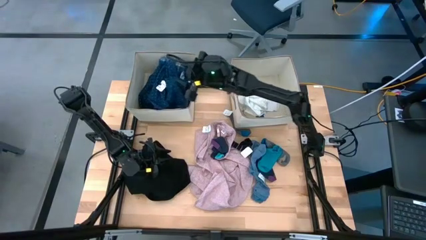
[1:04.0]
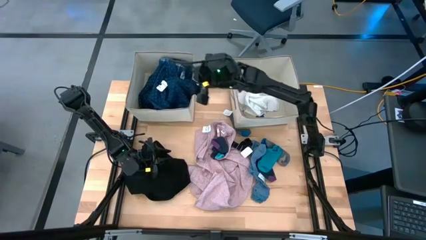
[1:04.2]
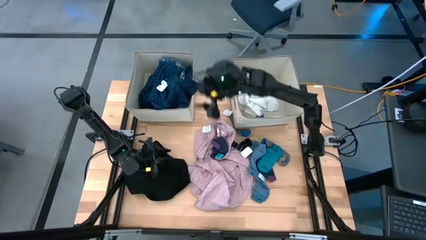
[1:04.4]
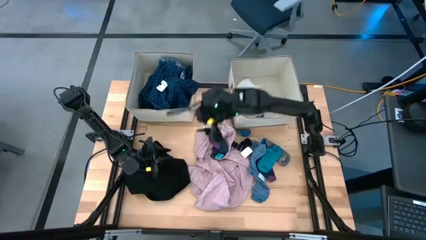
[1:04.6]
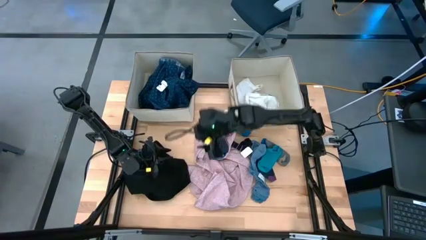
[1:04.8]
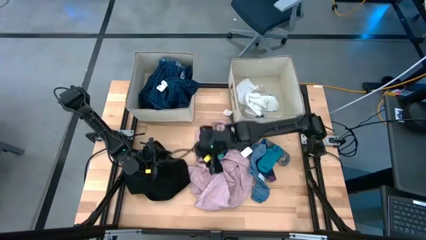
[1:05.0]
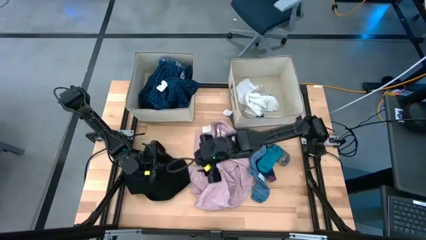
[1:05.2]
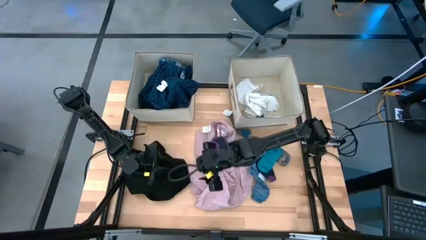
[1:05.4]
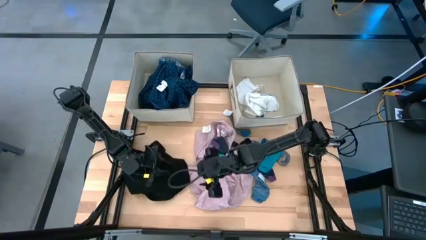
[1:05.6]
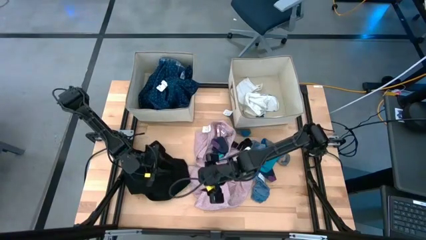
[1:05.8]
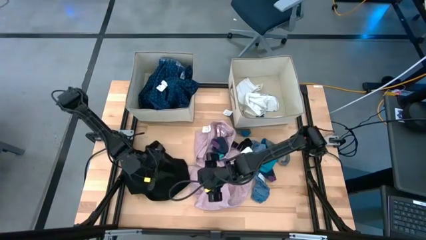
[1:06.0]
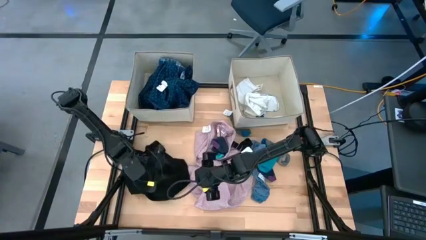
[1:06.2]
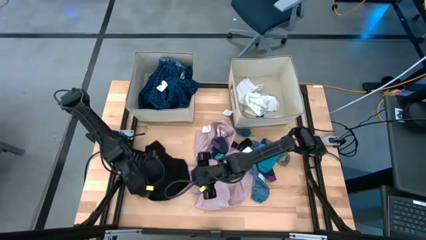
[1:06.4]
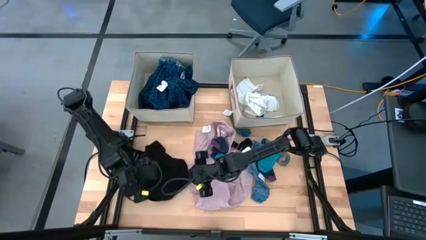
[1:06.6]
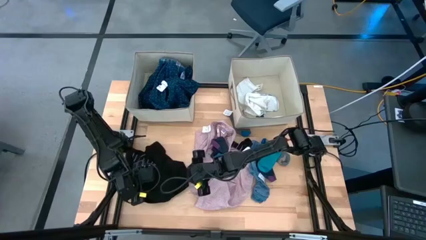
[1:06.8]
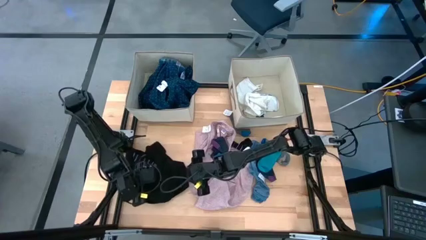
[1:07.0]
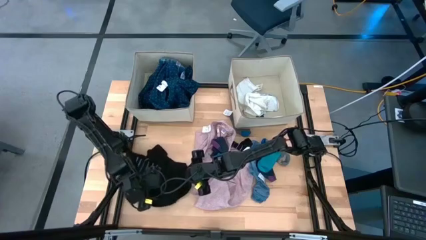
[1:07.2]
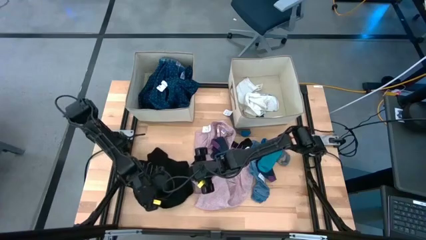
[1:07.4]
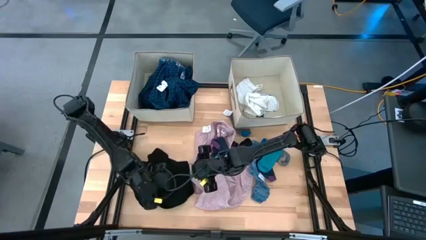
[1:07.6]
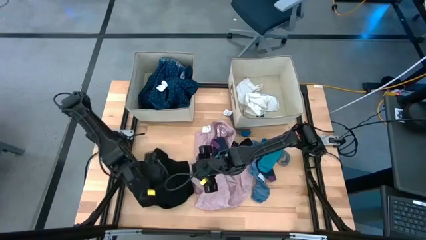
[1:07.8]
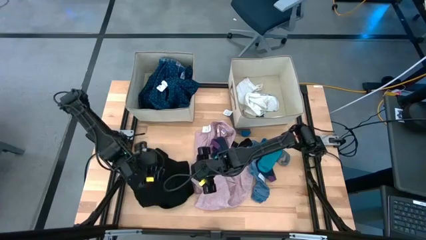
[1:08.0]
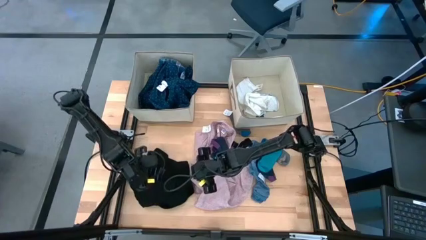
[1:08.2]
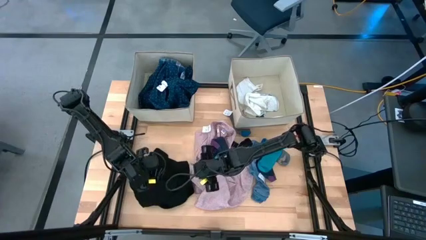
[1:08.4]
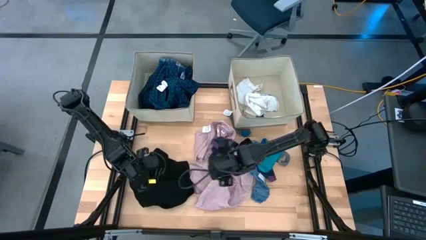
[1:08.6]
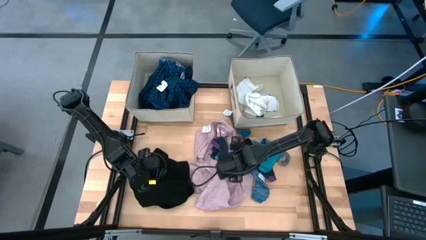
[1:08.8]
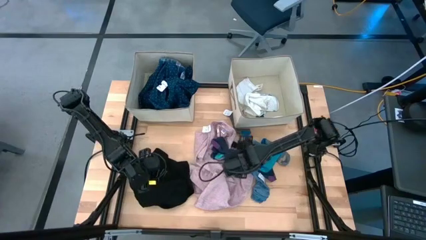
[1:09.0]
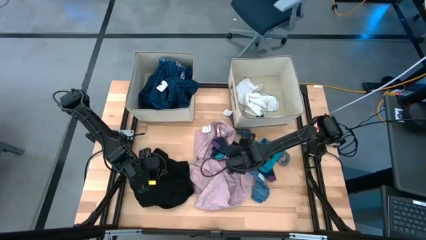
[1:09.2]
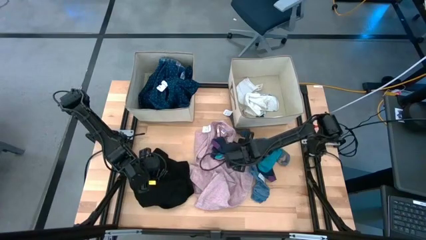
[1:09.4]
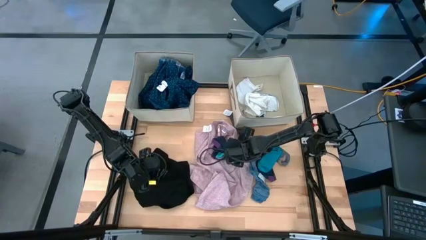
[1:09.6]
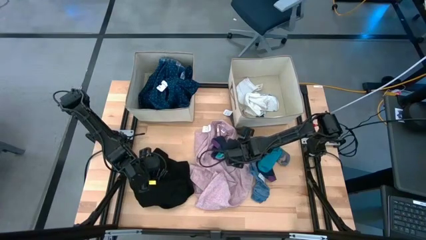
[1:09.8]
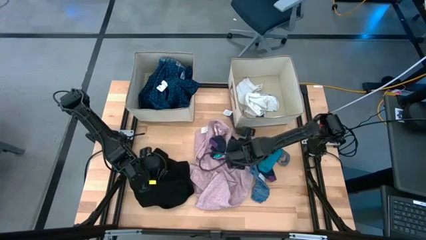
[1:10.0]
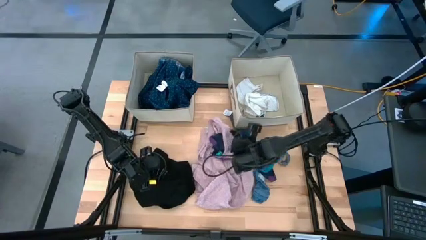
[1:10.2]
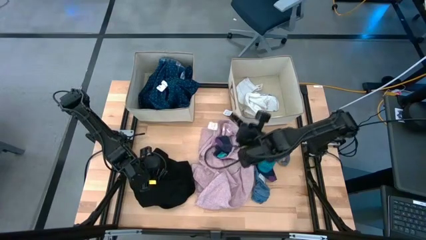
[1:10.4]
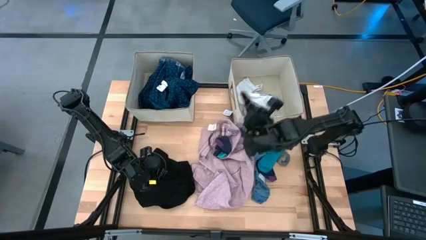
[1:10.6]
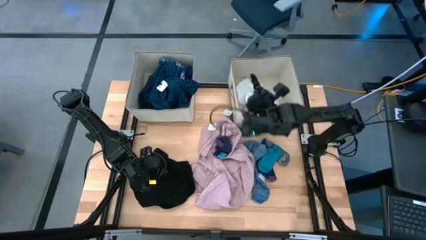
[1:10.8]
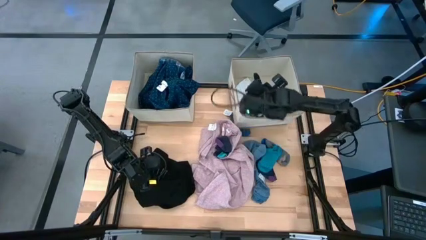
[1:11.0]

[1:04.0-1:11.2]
Task: Sort clothes
Put the left black stripe sock into the right brown laundry organizer

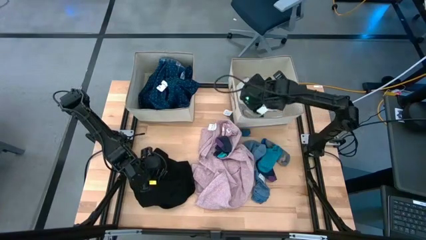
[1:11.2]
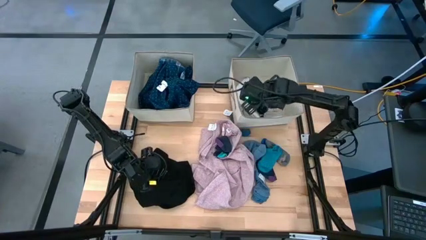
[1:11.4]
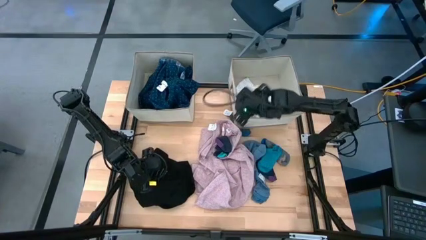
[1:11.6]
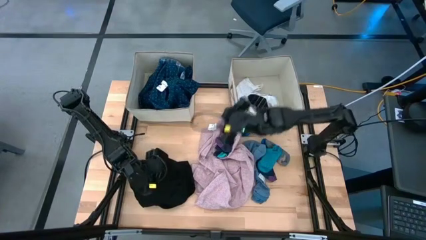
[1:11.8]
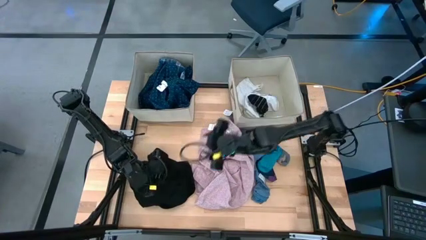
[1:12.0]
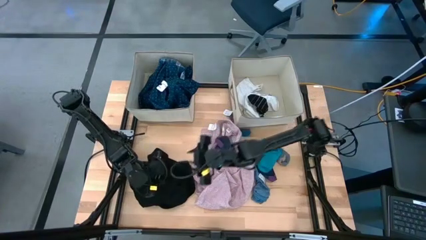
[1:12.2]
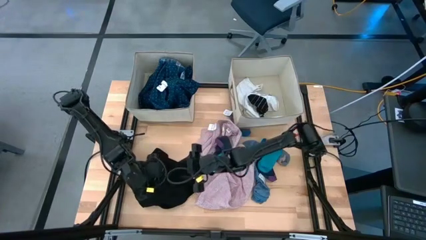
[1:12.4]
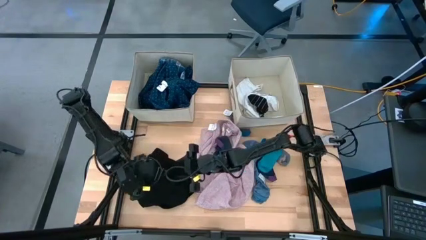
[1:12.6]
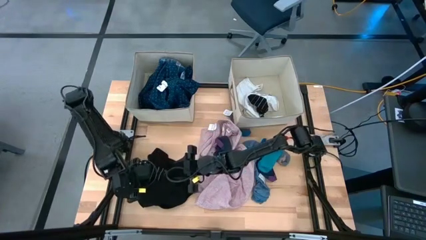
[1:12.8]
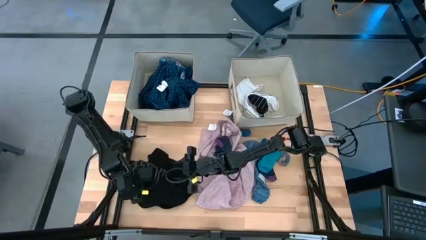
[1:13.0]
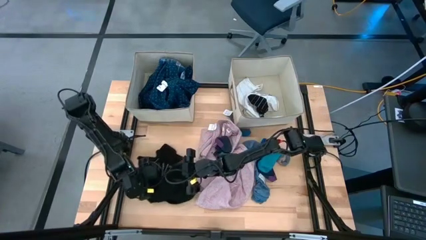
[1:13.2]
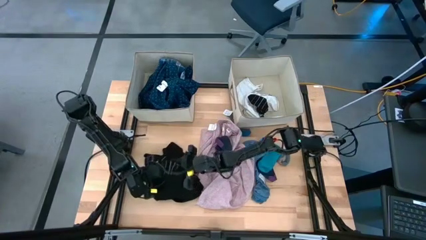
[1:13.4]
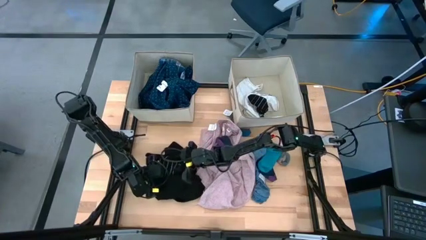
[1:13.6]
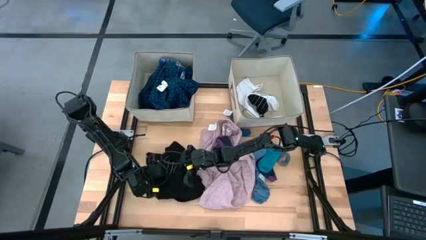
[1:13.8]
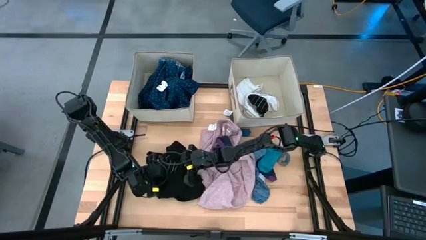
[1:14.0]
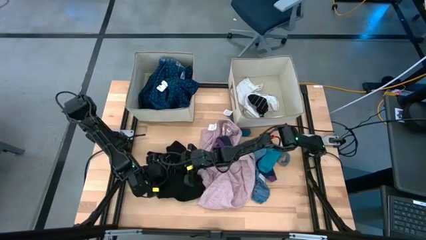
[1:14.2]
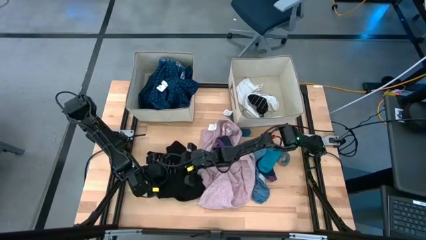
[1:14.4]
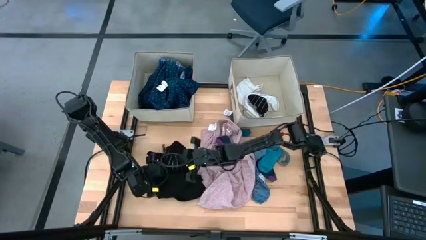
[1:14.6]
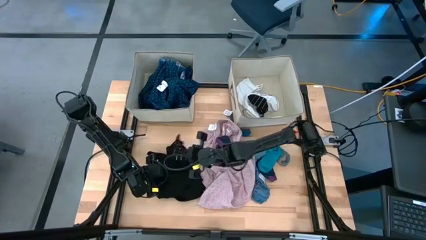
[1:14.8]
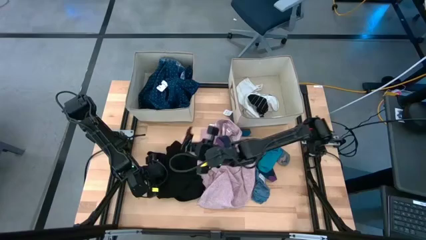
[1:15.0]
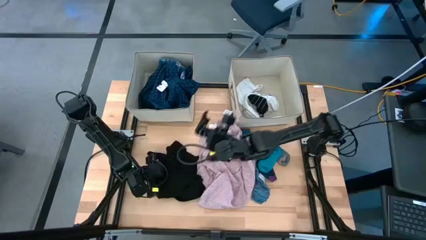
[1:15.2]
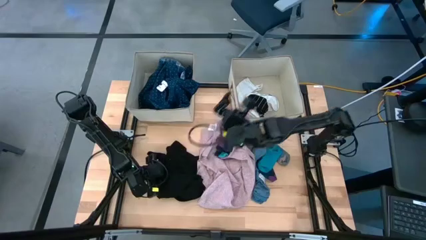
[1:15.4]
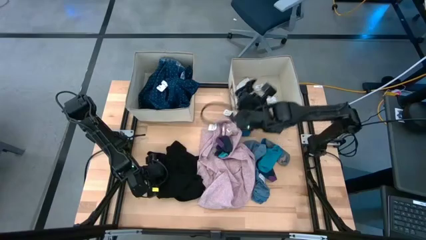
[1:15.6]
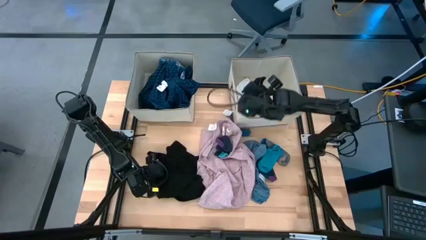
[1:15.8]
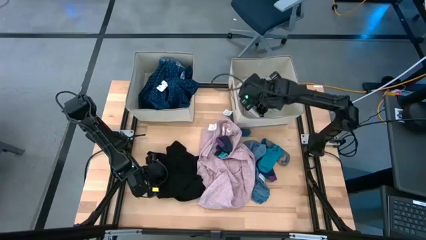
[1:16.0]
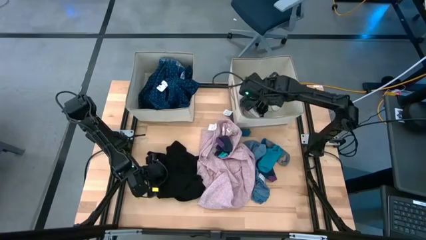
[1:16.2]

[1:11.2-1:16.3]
Put the black stripe sock into the right brown laundry organizer
